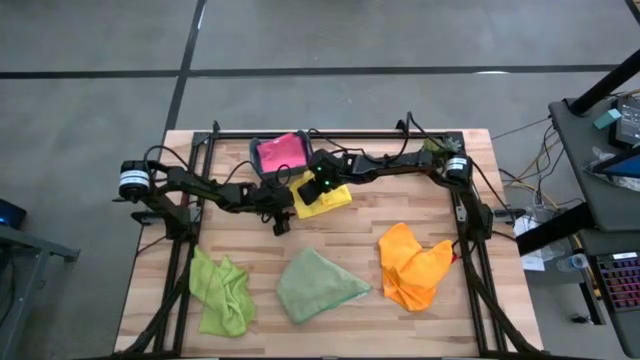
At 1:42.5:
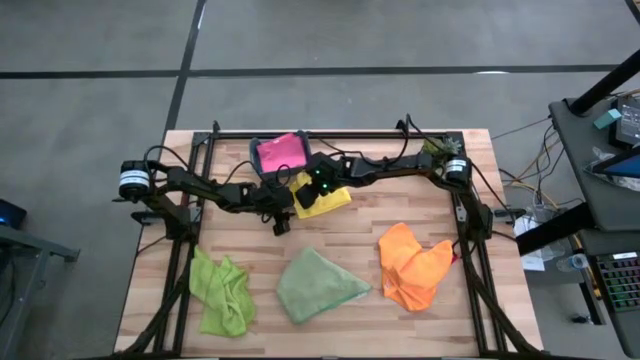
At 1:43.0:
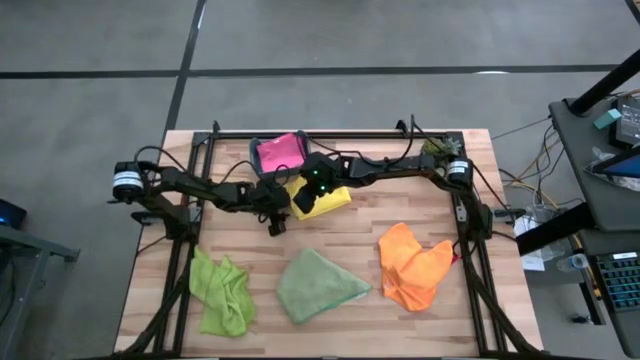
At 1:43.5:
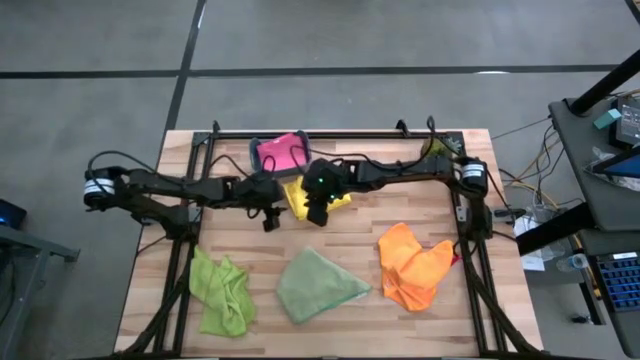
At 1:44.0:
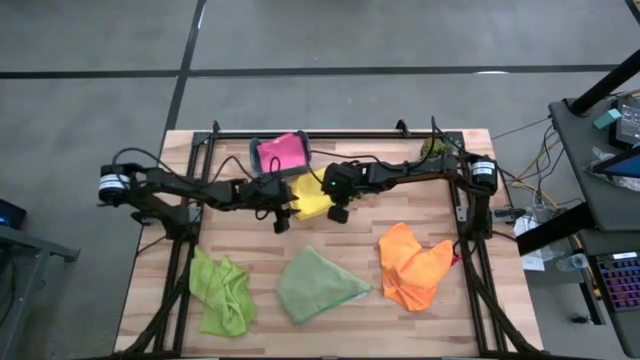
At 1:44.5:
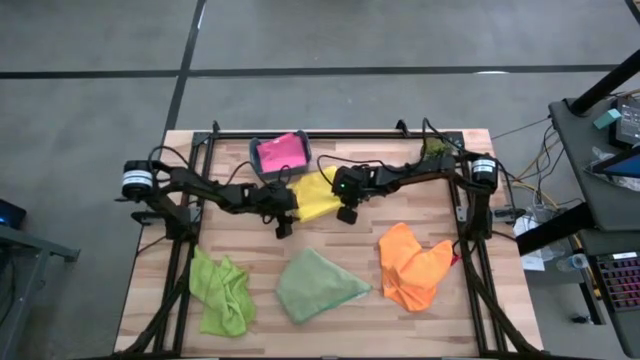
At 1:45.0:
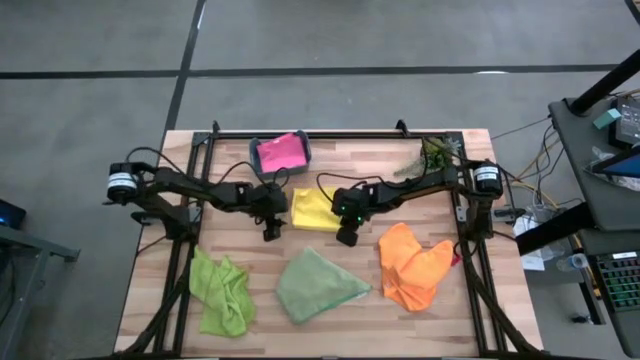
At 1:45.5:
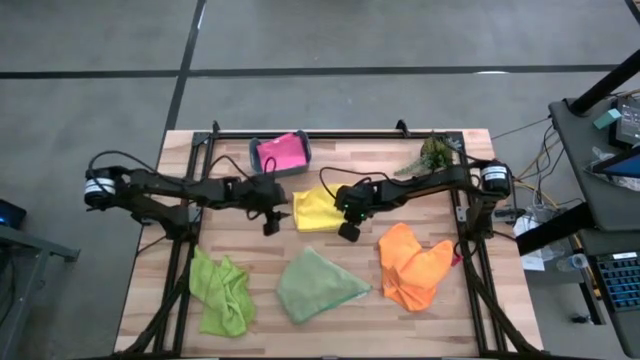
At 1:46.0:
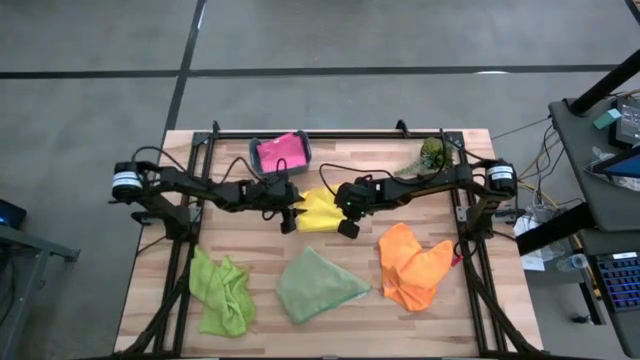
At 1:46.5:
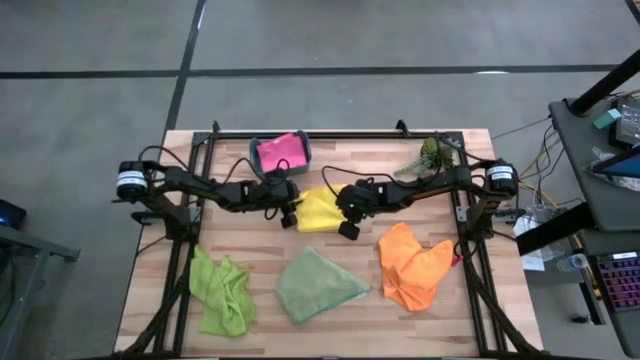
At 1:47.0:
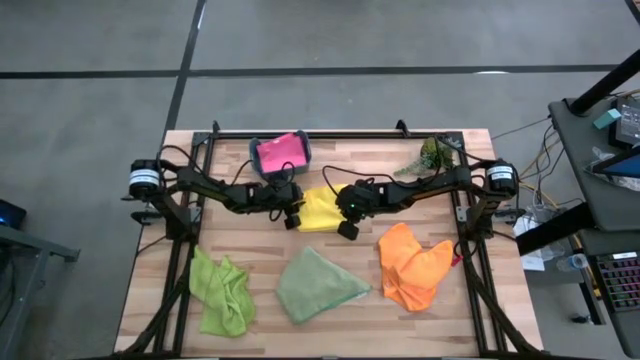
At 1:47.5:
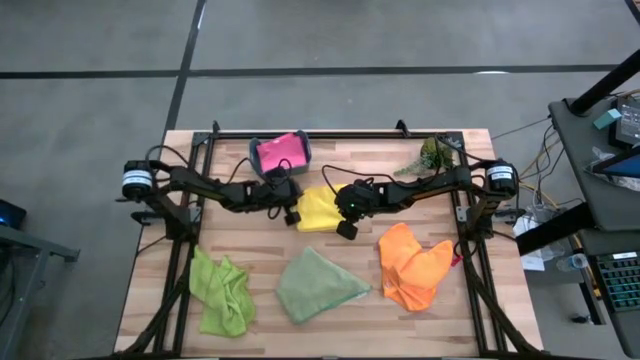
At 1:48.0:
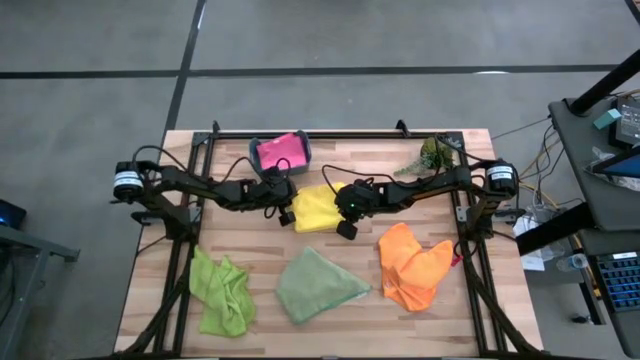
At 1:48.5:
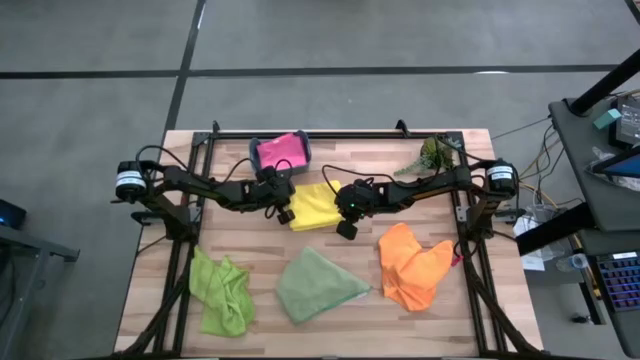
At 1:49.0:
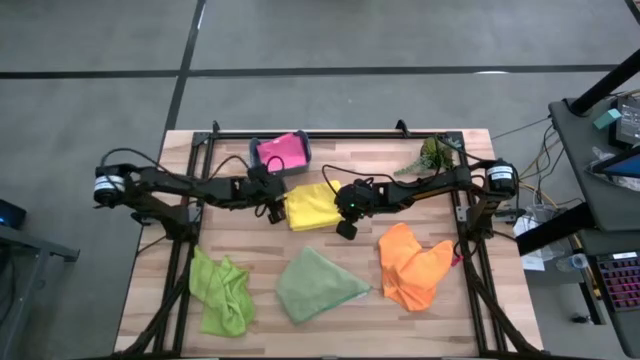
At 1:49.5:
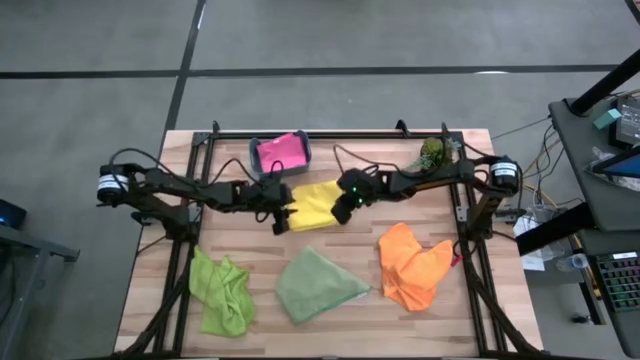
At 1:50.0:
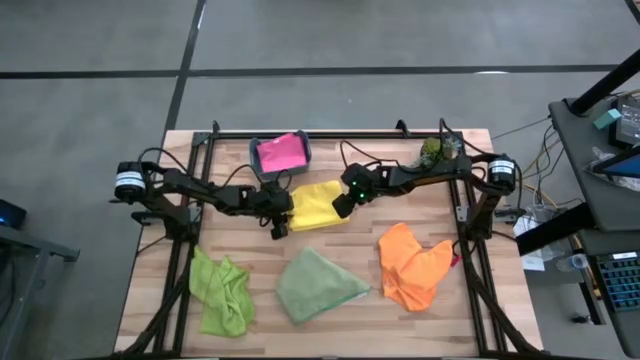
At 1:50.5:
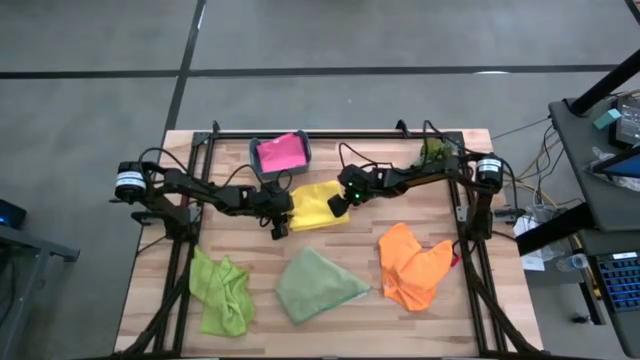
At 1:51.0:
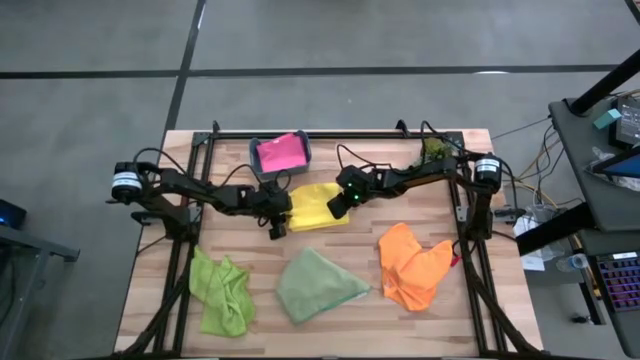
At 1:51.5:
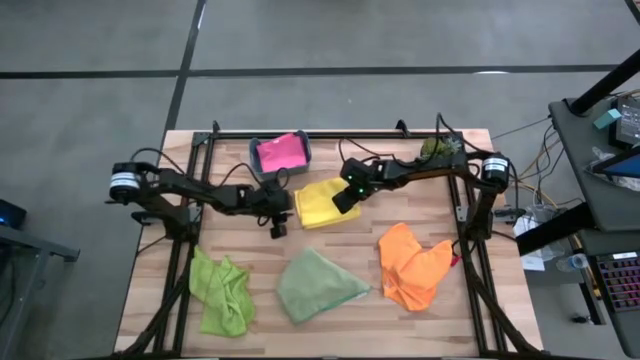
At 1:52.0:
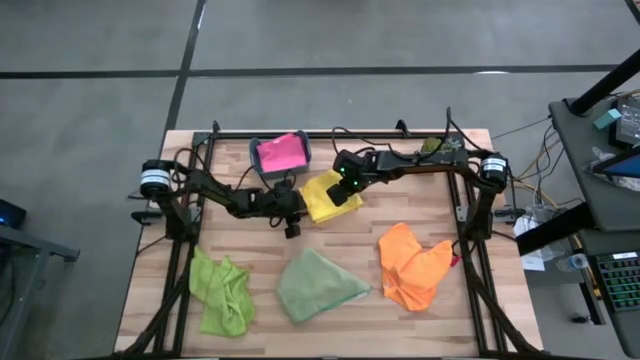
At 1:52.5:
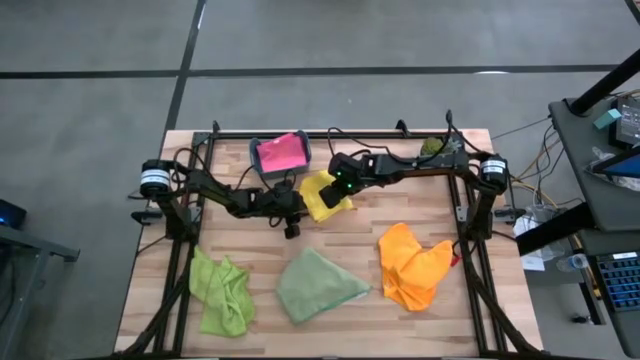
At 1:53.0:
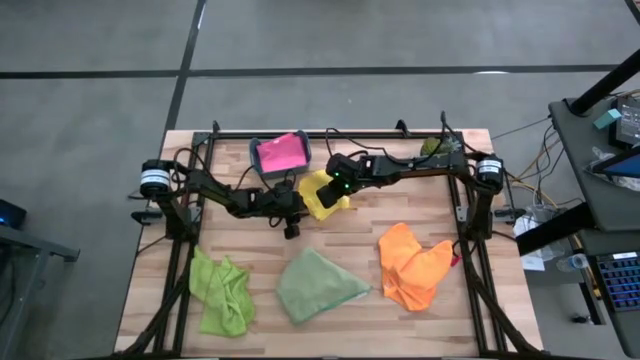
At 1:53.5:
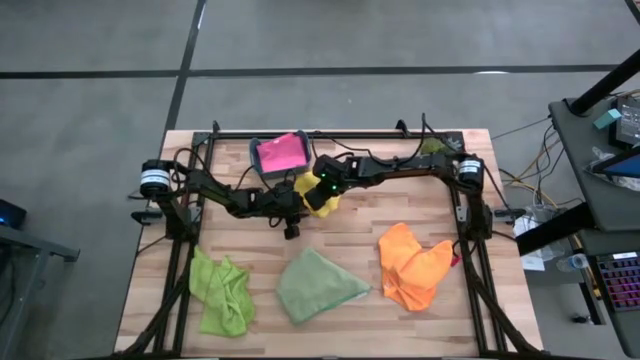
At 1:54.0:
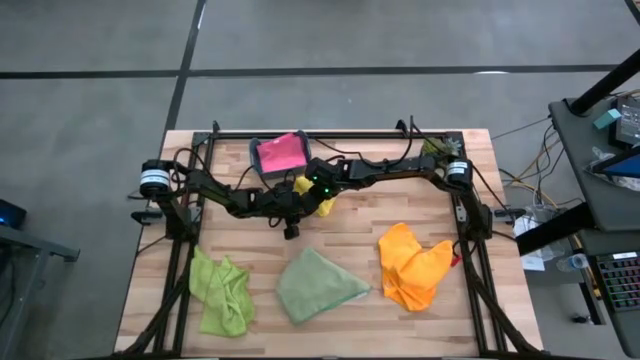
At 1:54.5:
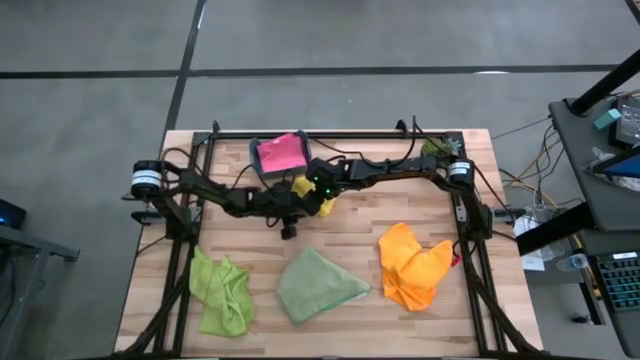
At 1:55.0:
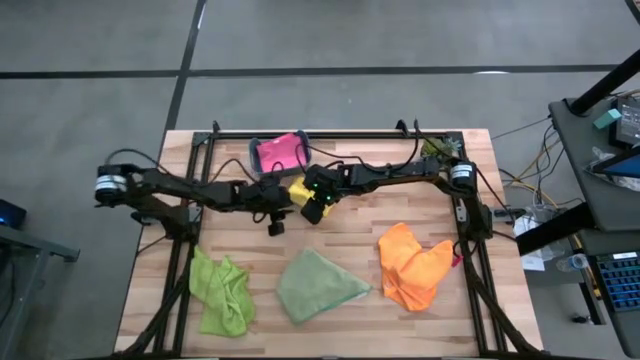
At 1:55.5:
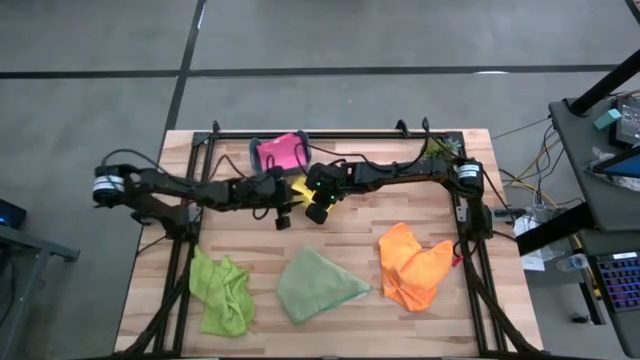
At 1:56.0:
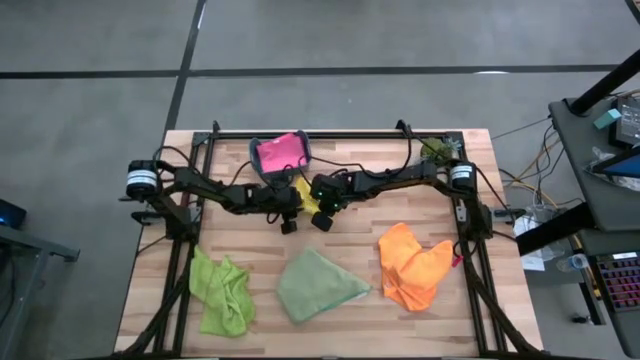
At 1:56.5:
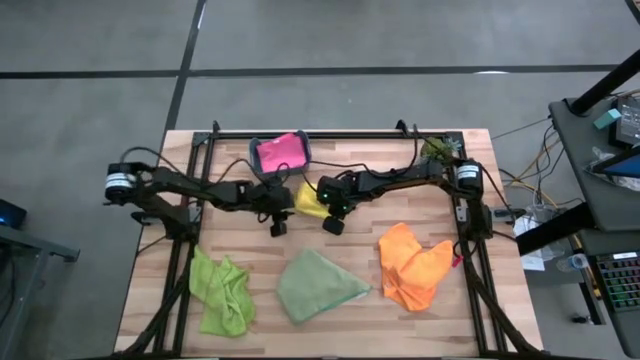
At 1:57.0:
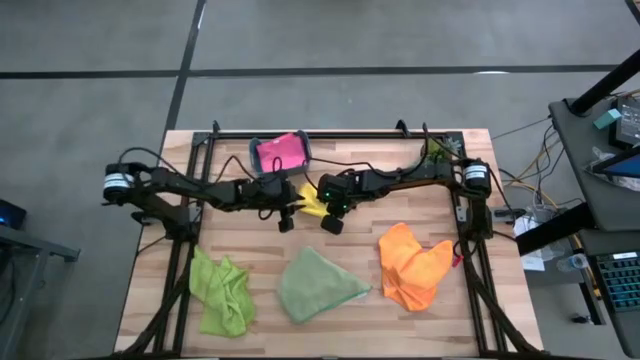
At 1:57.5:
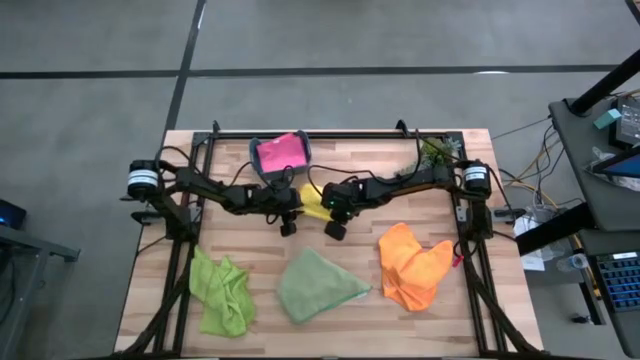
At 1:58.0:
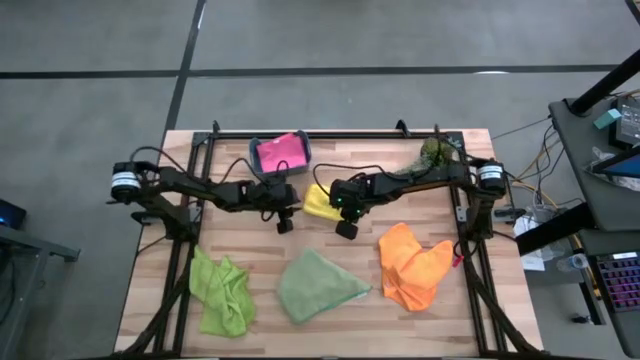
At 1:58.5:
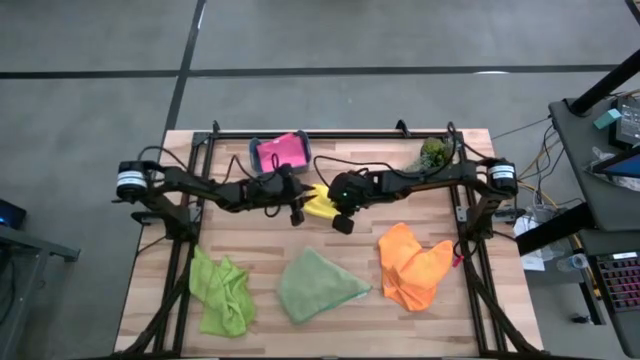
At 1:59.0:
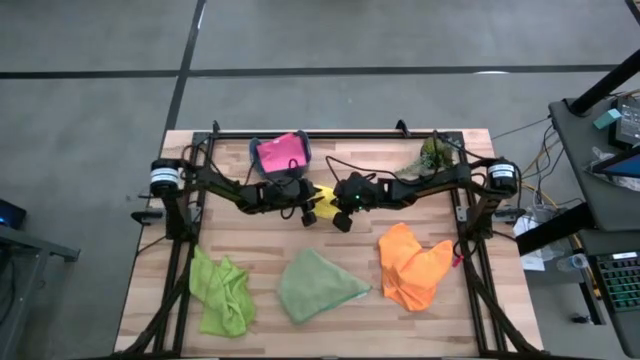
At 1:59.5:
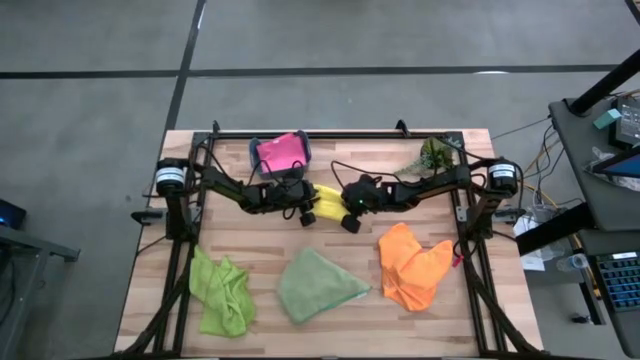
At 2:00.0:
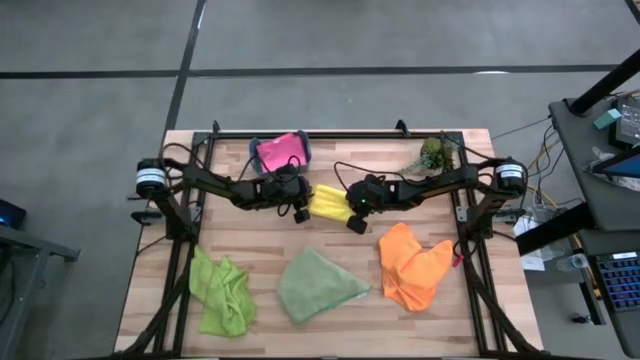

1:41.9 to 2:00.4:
Task: Fold microfiber towels
Fold the yellow microfiber towel

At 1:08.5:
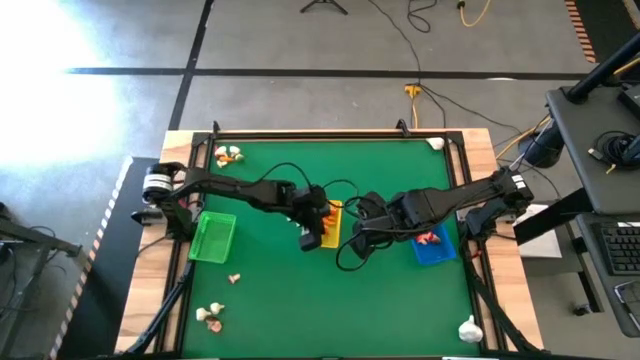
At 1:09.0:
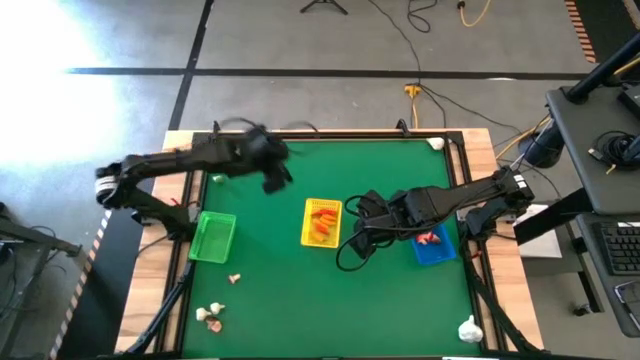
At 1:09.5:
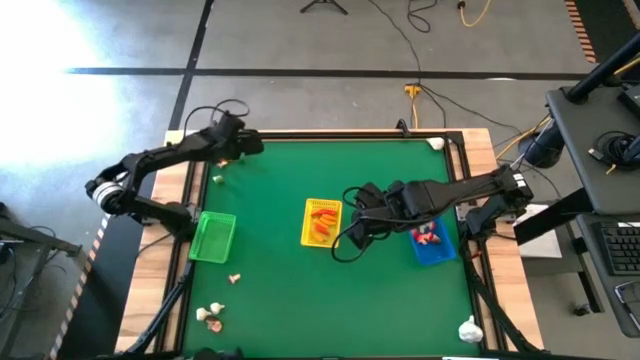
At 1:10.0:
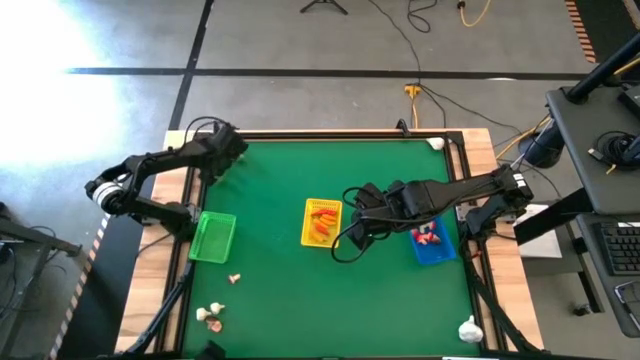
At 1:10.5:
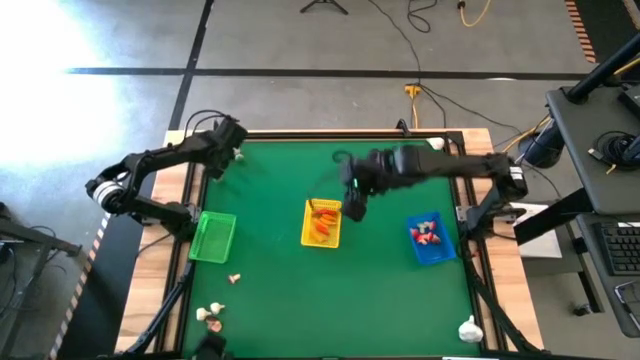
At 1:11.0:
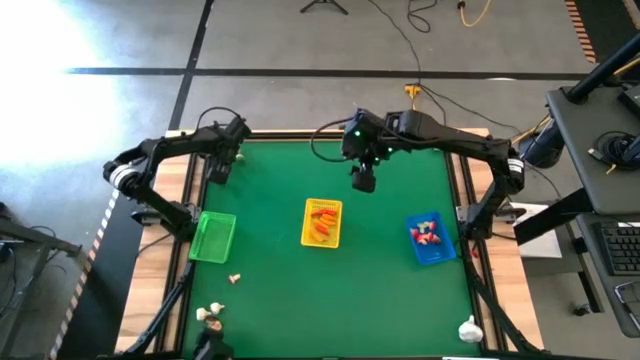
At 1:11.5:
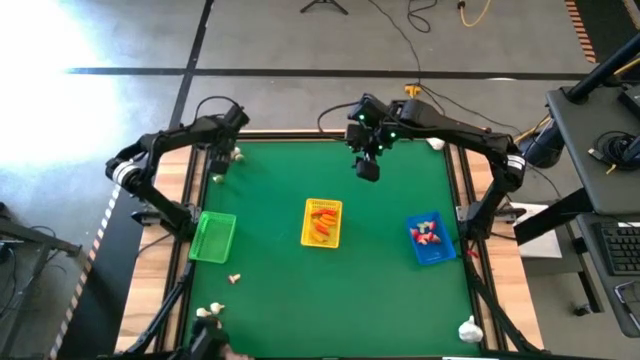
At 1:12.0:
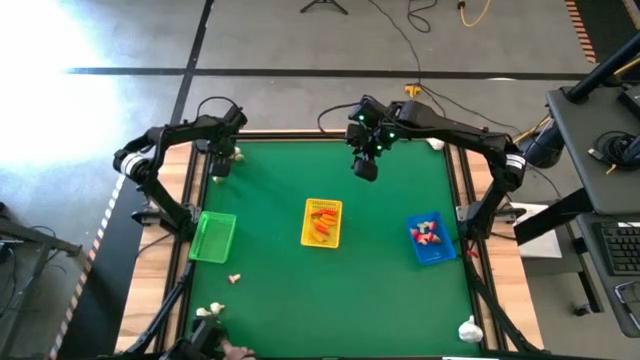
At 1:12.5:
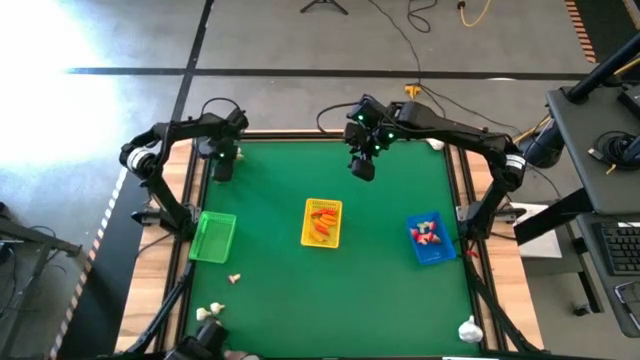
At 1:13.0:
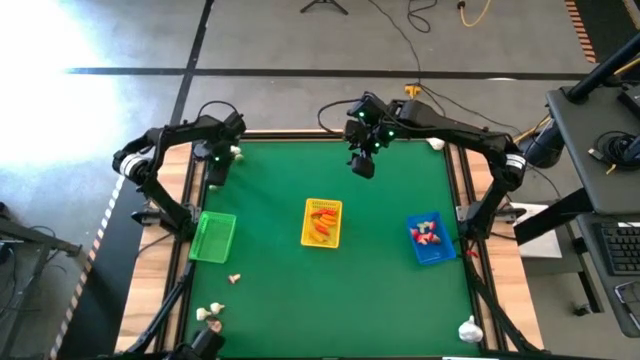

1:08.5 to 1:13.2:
Task: Sort produce into baskets
Put the yellow chili pepper into the yellow bin
